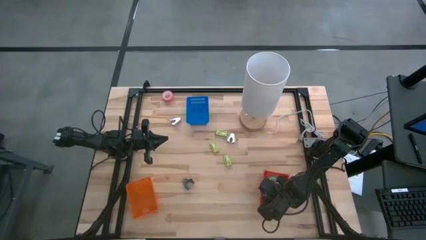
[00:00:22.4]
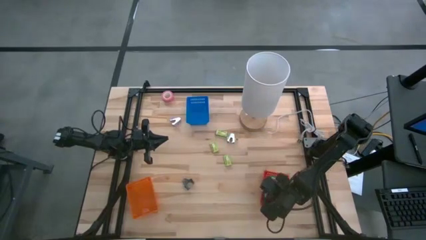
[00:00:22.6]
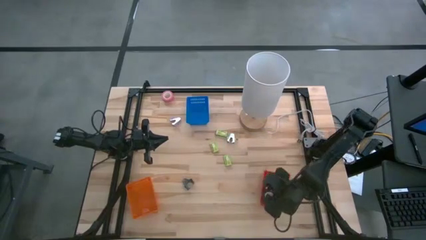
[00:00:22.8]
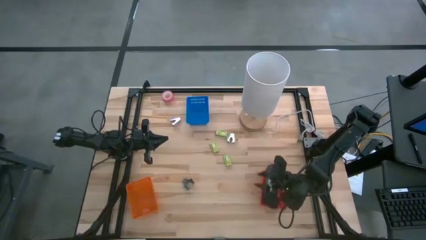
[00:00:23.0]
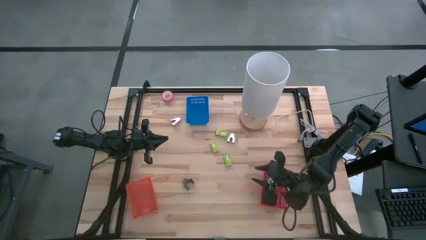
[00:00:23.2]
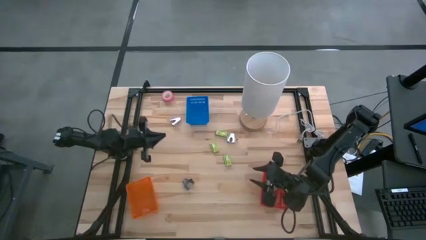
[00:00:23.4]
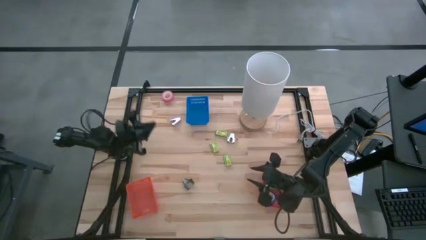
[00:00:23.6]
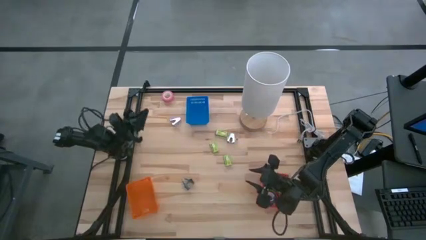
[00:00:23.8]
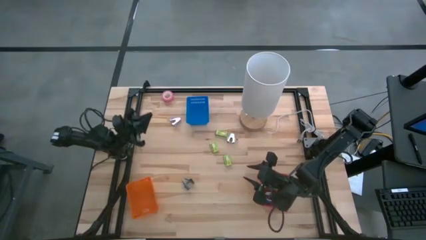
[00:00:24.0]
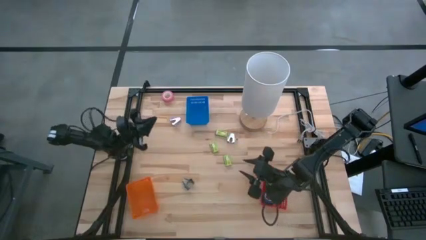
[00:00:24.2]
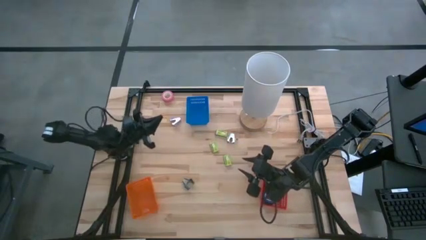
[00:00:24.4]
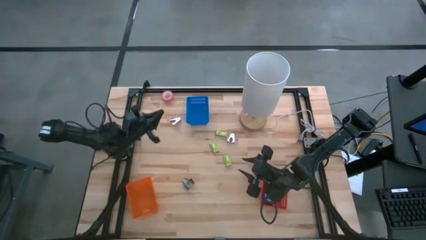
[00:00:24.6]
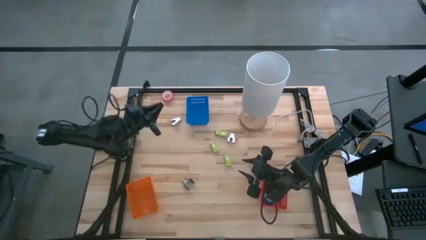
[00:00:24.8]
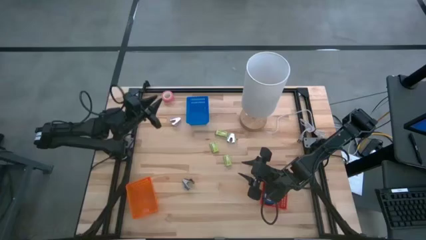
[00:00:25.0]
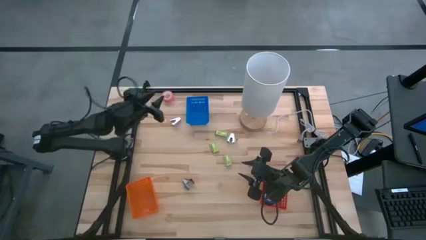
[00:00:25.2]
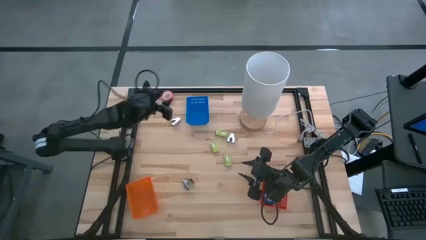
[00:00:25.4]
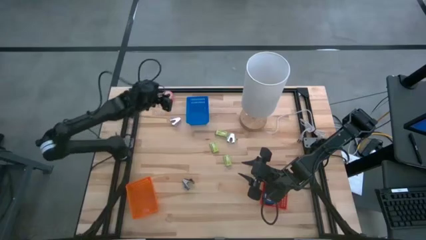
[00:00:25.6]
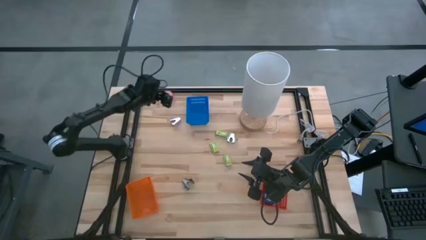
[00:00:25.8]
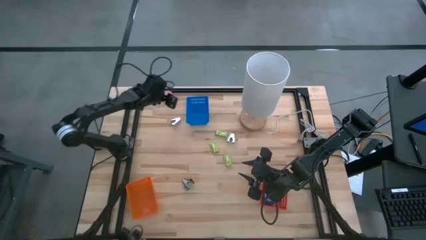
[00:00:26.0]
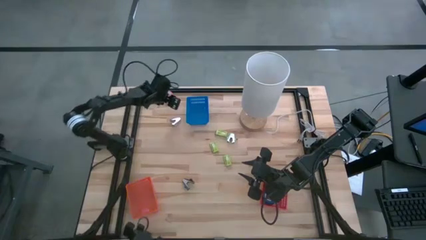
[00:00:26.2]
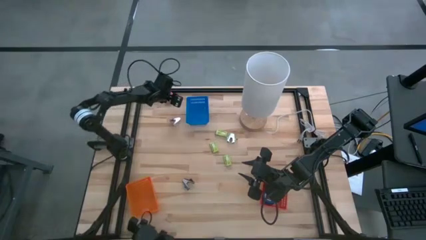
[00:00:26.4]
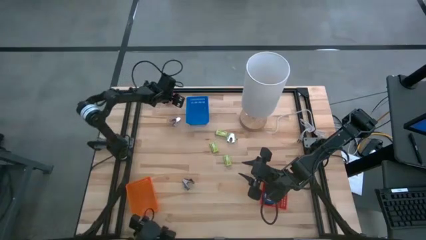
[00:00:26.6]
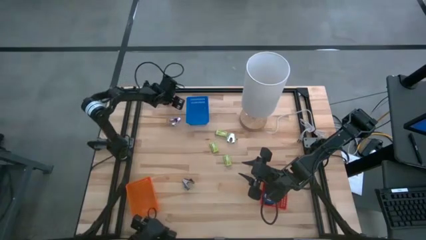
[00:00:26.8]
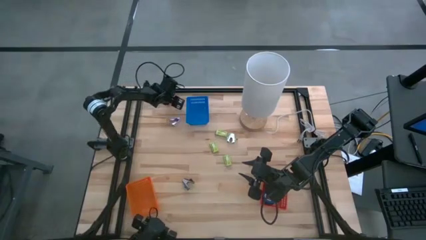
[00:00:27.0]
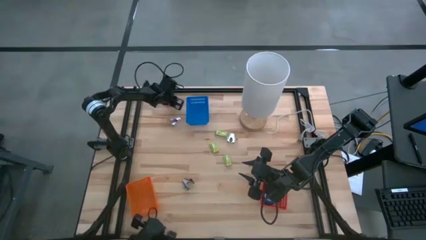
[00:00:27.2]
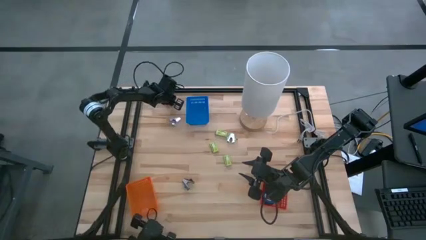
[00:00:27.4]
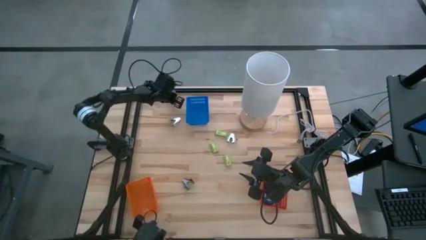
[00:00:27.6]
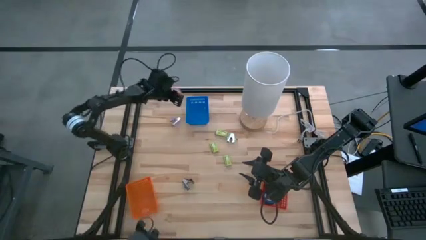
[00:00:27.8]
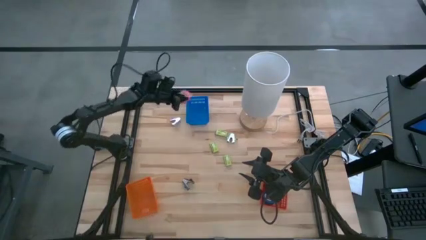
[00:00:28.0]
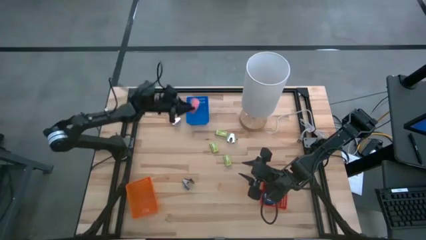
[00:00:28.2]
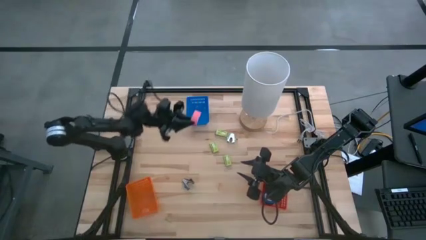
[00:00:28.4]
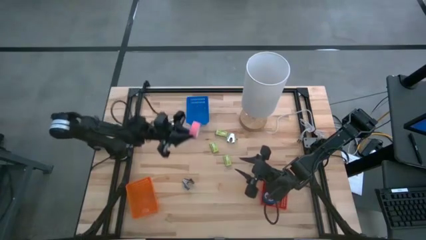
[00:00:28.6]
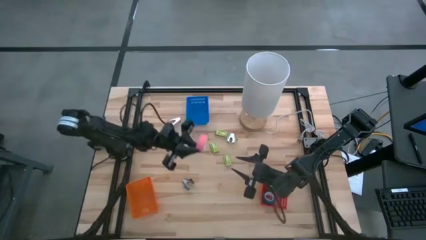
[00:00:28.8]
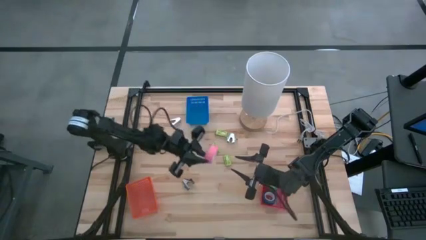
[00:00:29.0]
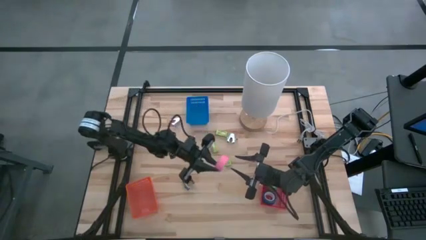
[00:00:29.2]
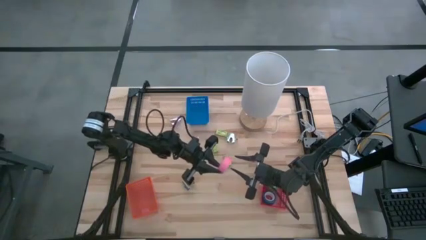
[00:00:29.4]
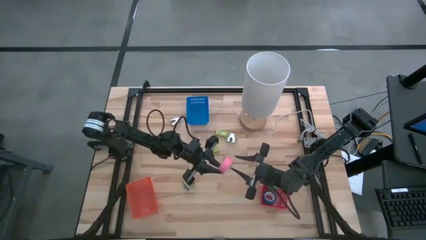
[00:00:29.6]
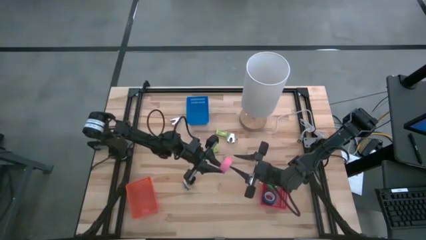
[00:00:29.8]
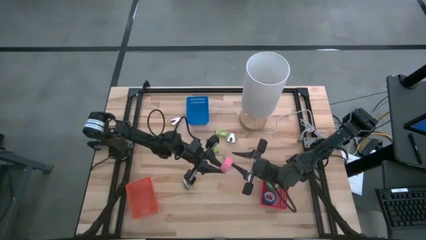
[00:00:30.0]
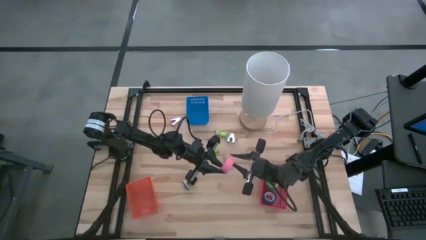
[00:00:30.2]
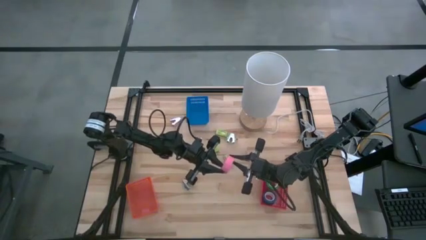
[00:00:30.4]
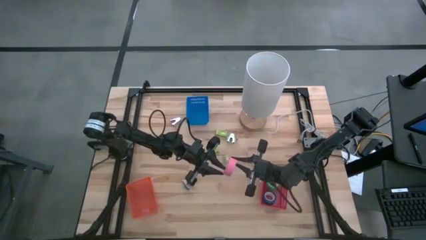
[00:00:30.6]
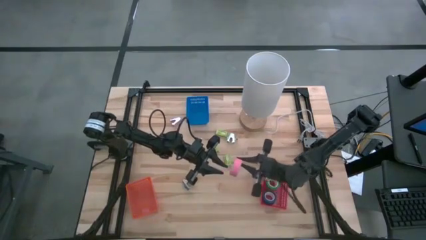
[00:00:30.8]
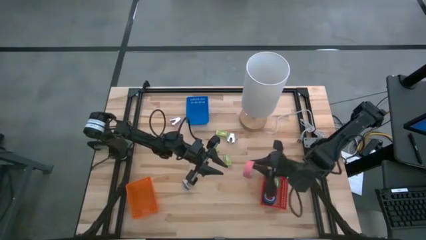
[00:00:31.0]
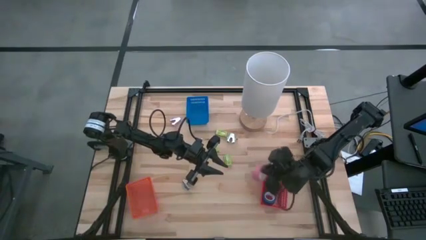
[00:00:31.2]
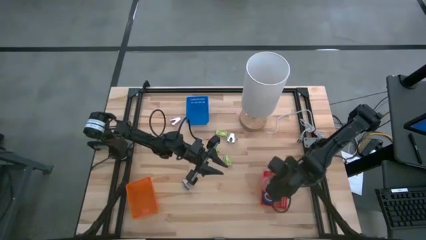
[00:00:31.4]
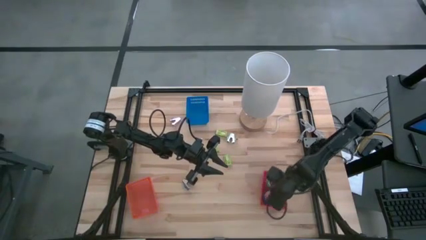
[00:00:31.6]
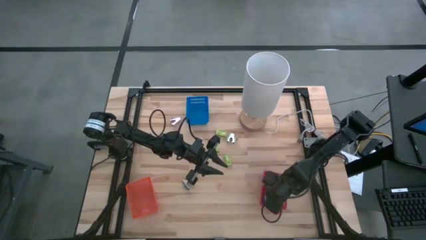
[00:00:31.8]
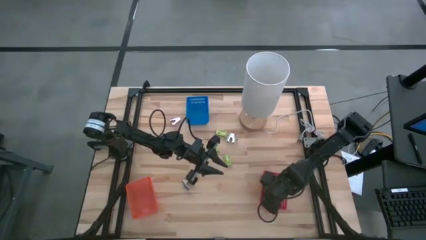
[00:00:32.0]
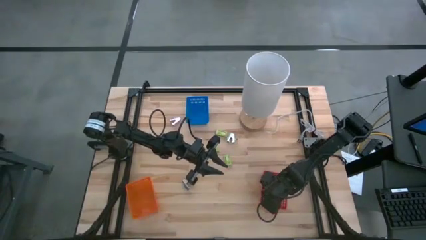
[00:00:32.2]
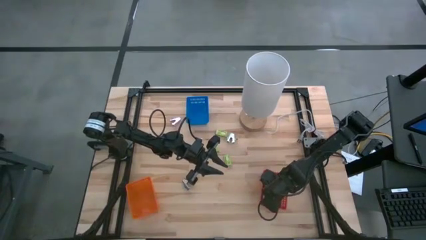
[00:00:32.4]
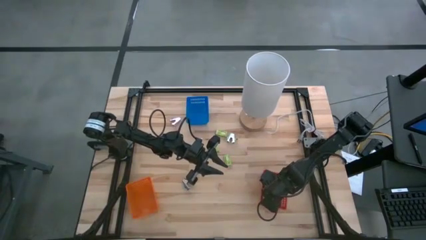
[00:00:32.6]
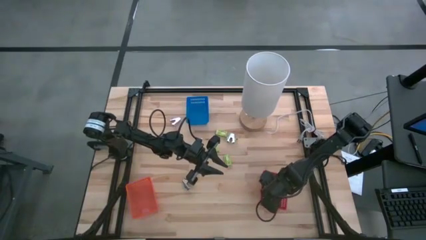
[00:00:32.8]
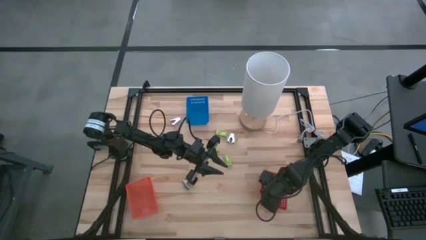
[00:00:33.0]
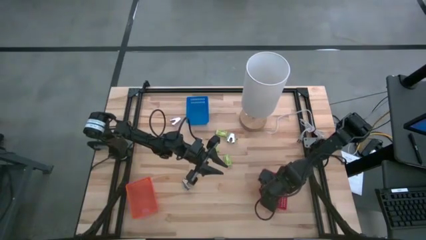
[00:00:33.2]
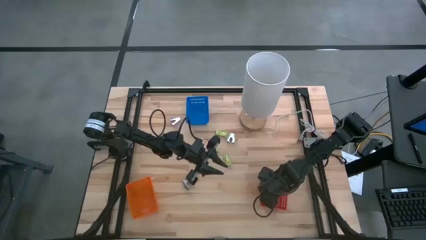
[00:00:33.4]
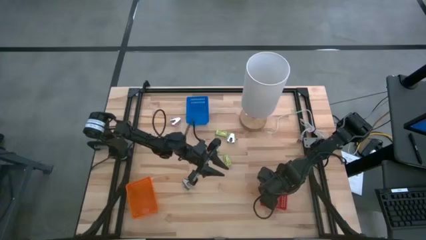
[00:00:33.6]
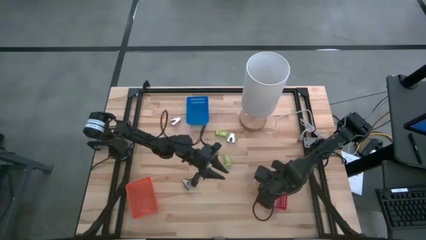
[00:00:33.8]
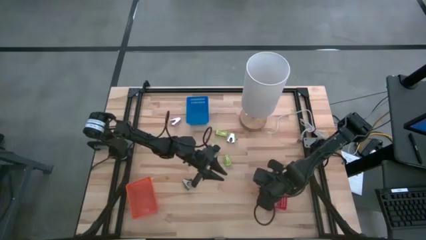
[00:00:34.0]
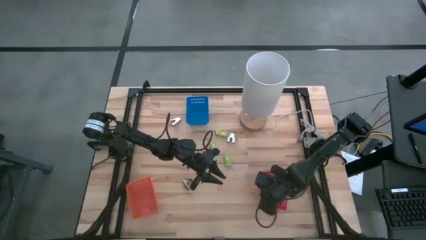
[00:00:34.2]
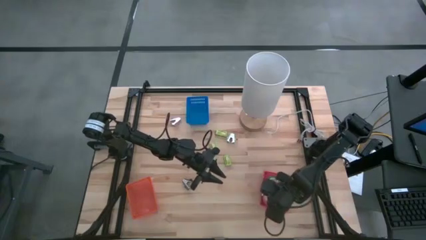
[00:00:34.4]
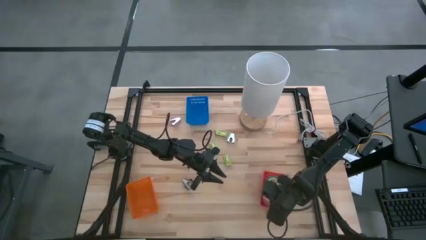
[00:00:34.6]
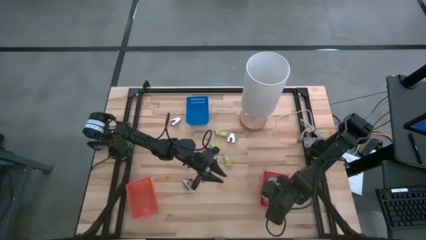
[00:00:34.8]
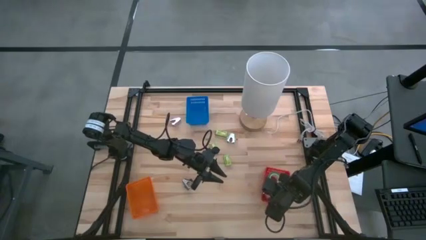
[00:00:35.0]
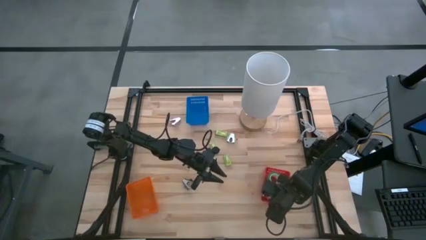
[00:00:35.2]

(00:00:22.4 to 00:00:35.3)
Task: Pick and place Stapler, Stapler remover, tape
Put the pink tape into the red bin

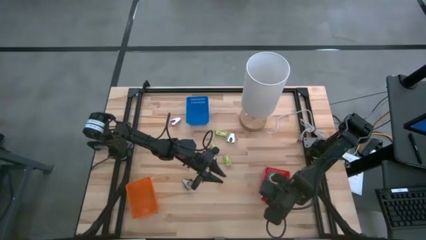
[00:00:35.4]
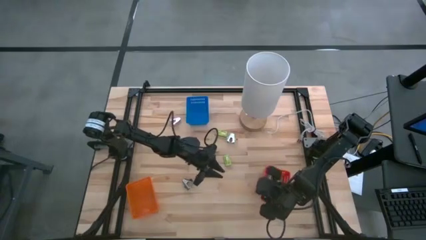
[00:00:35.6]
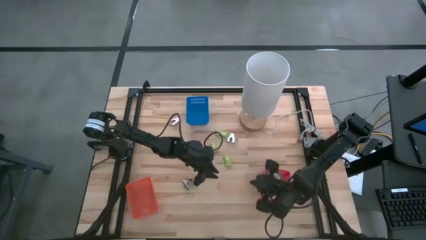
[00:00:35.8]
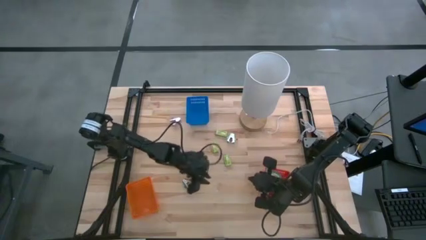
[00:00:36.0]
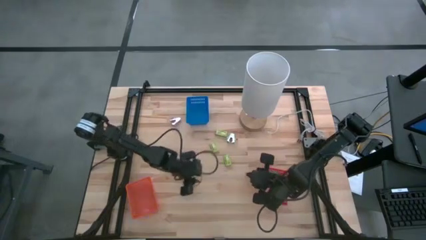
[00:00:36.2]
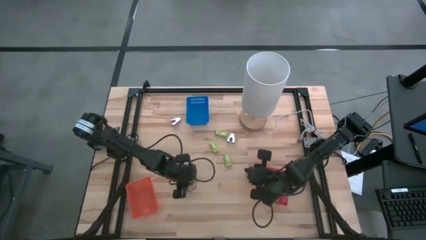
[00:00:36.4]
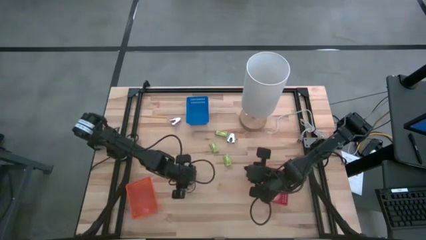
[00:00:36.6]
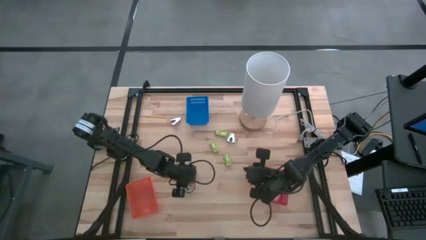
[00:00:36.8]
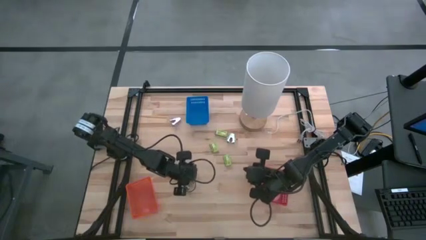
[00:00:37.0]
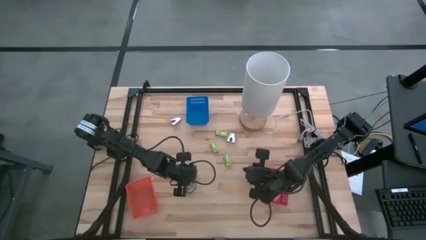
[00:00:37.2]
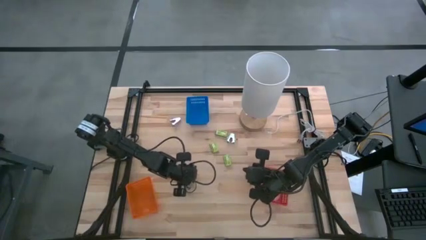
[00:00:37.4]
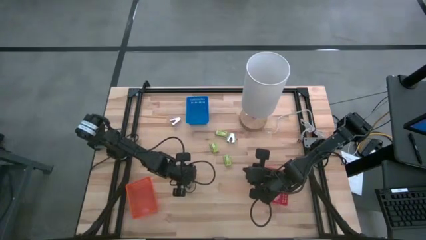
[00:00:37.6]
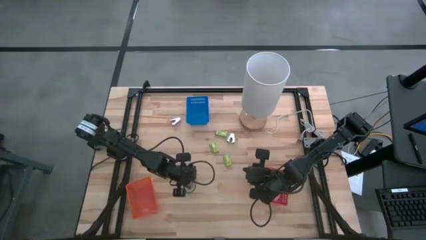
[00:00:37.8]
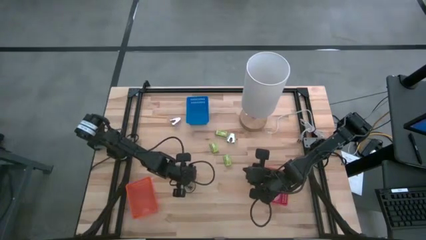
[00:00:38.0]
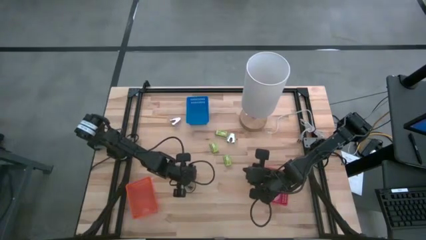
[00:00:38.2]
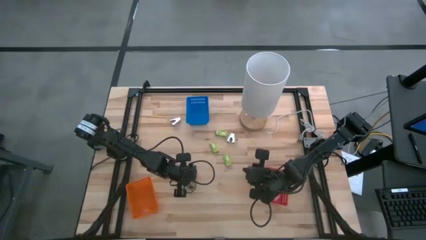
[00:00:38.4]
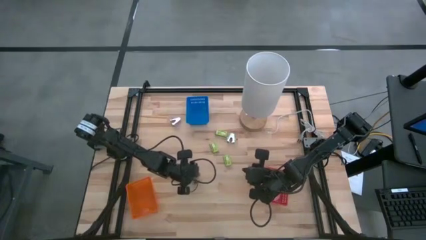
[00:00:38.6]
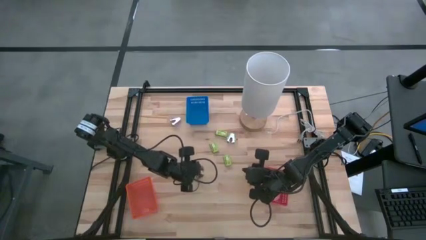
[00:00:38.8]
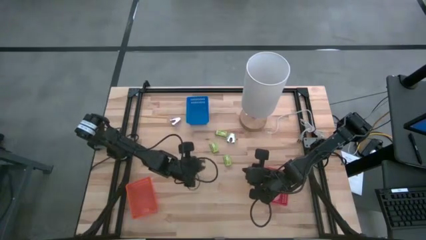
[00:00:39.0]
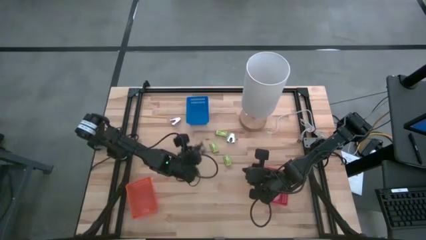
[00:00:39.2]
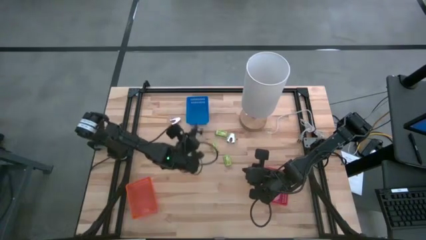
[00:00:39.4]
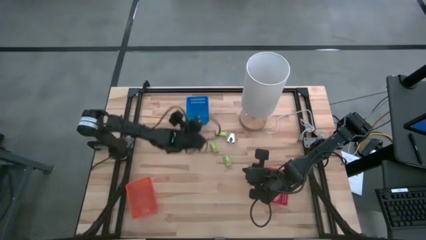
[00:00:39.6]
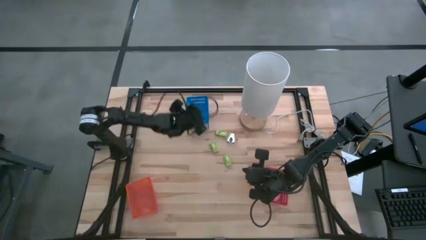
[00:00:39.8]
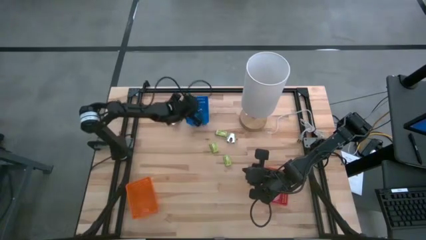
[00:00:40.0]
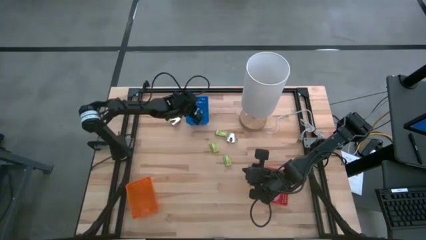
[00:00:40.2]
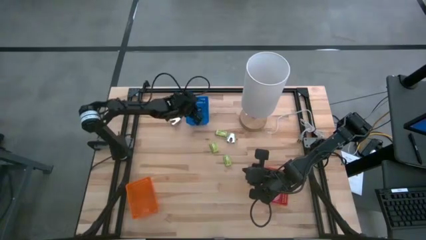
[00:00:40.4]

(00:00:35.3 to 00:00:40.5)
Put the black staple remover into the blue bin
